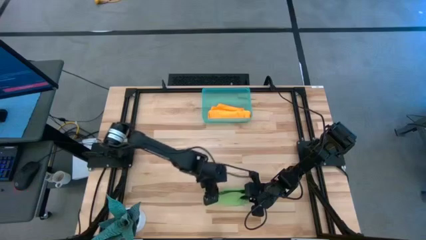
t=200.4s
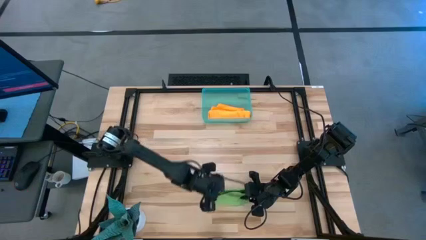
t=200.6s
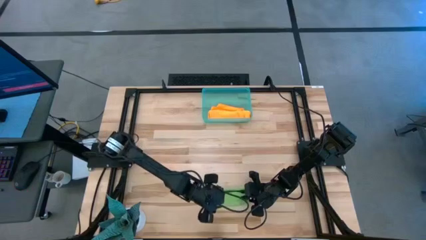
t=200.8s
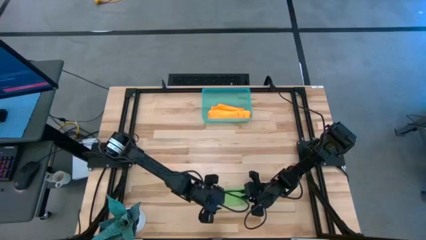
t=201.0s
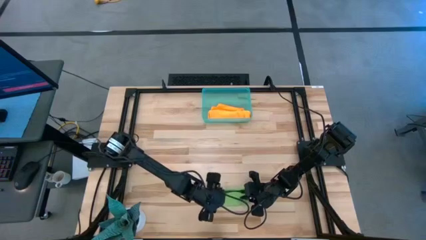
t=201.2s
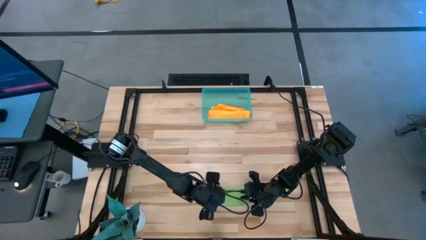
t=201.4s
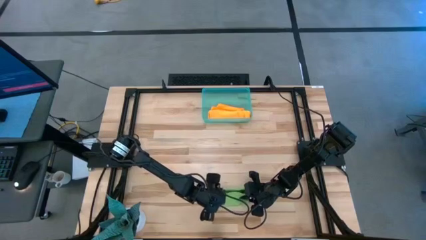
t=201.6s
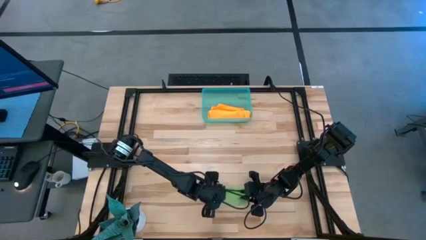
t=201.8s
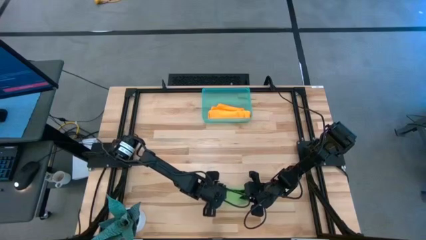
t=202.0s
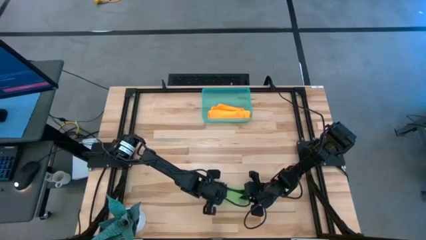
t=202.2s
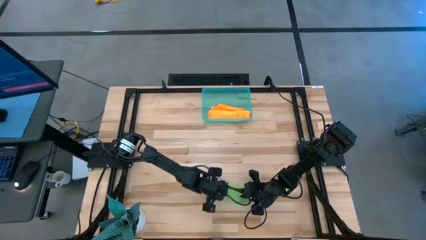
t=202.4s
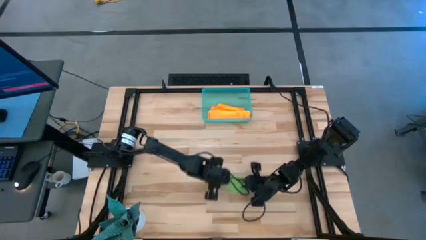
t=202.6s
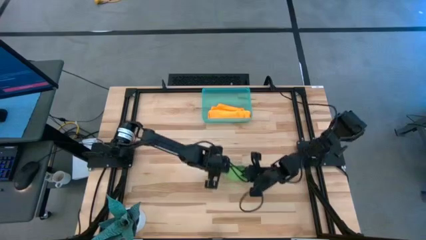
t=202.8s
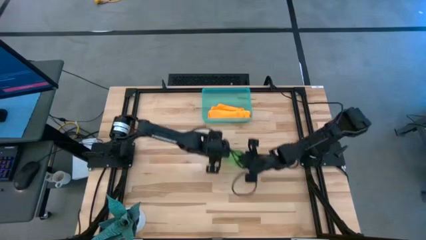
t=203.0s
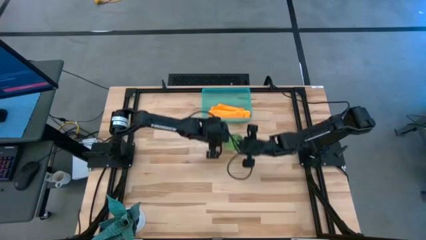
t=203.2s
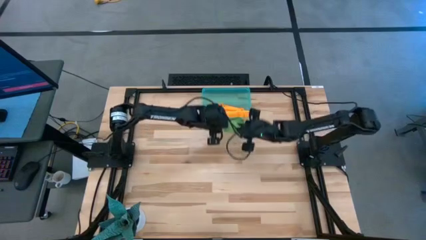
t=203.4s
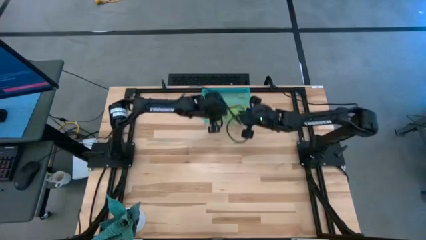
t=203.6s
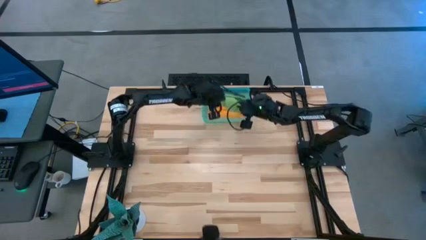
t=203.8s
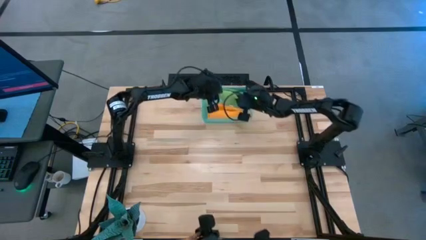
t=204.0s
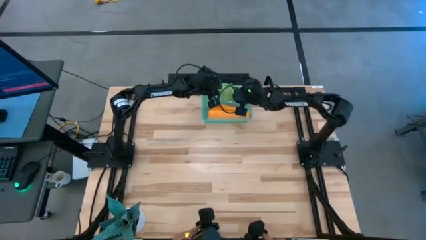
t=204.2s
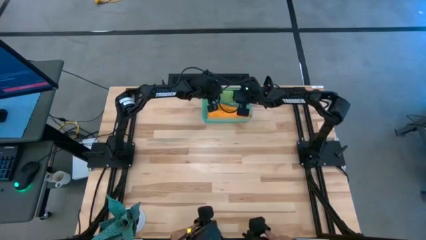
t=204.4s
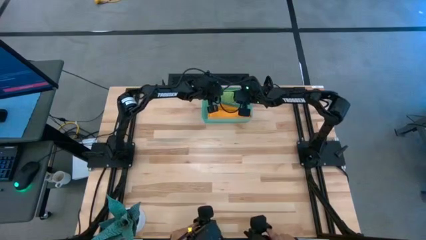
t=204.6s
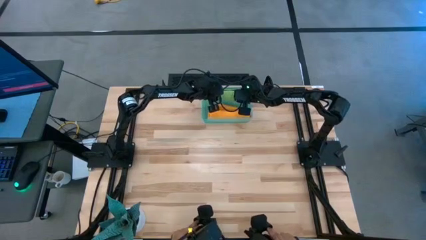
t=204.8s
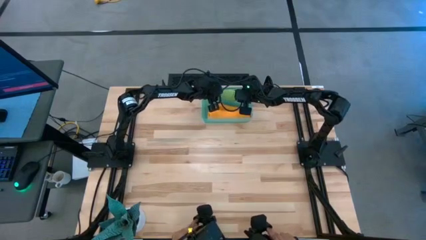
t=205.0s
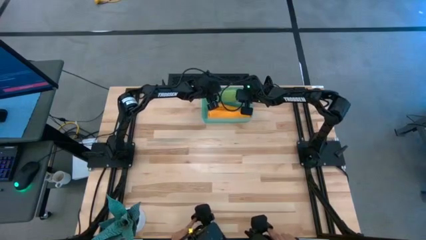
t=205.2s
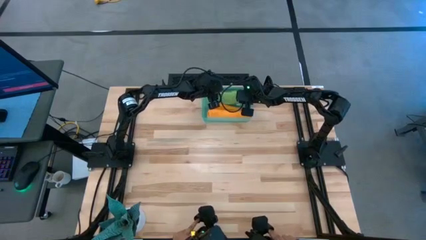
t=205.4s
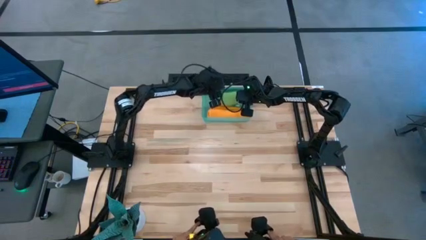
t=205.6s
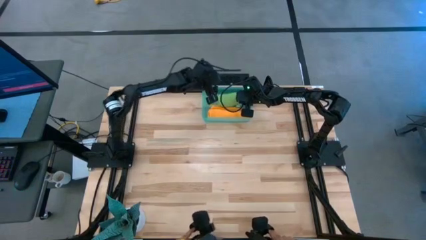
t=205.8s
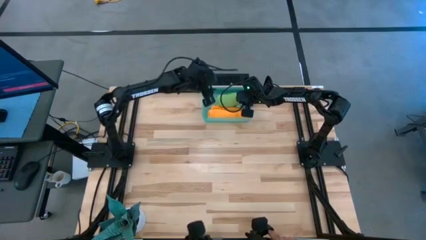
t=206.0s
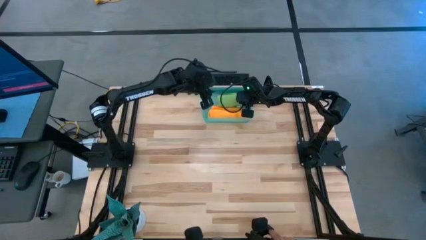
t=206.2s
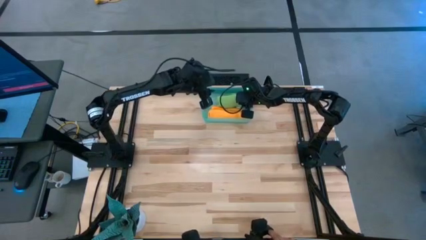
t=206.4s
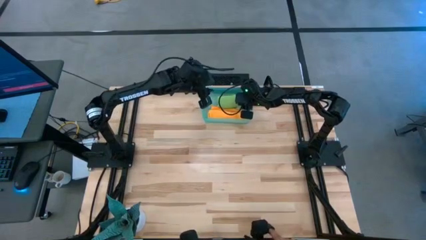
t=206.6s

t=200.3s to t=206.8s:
Task: Roll microfiber towels into tight, uniform cylinder then place into a basket
Put the rolled green microfiber towel into the blue bin

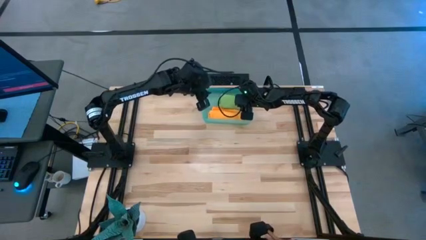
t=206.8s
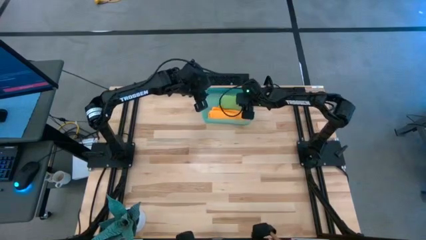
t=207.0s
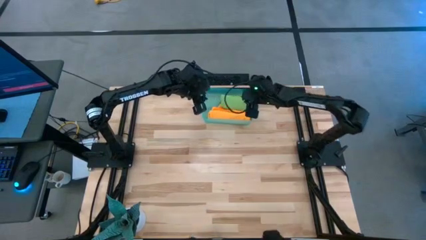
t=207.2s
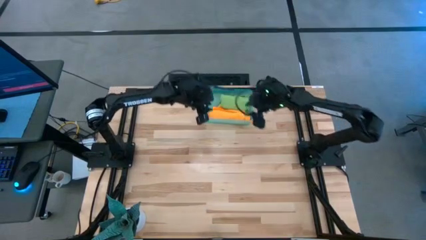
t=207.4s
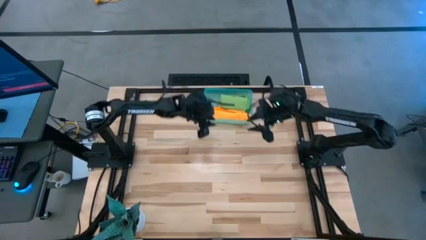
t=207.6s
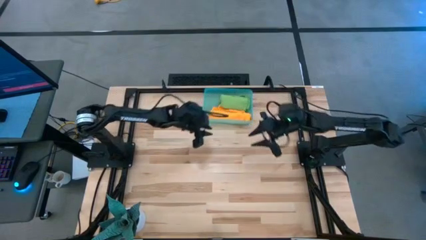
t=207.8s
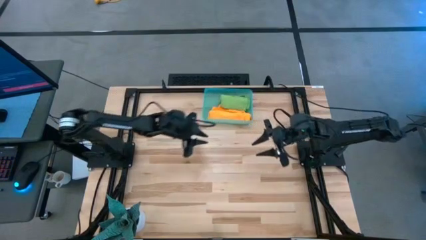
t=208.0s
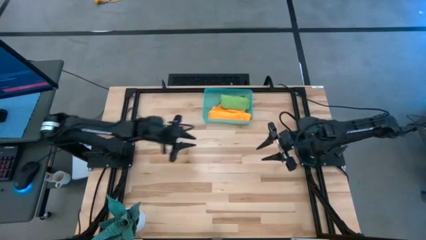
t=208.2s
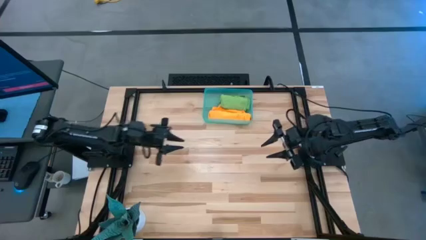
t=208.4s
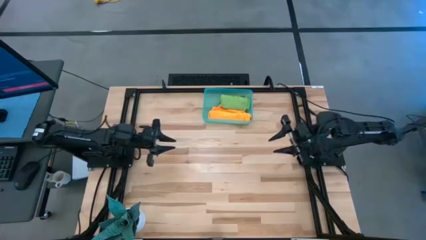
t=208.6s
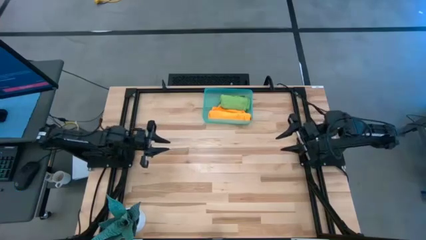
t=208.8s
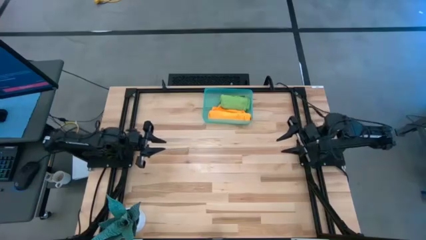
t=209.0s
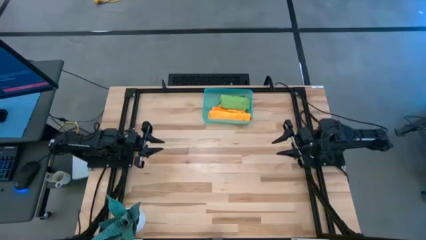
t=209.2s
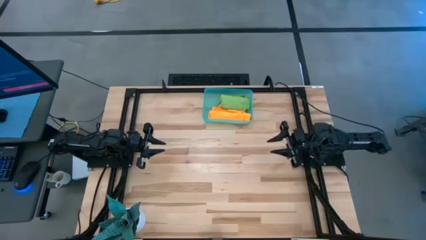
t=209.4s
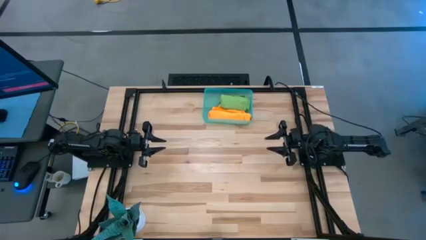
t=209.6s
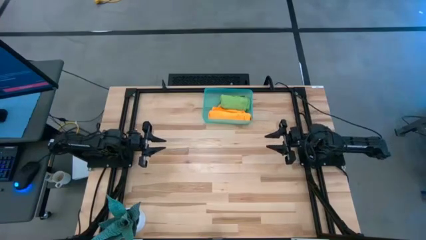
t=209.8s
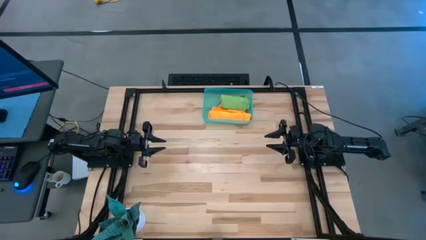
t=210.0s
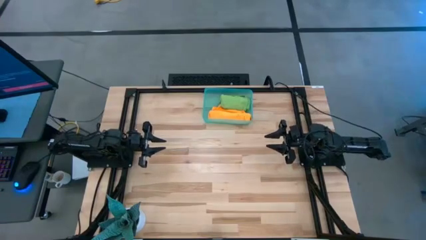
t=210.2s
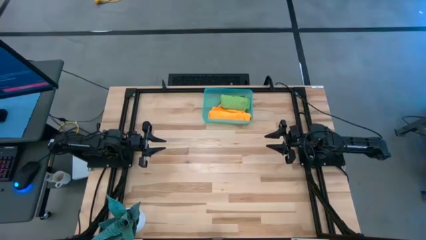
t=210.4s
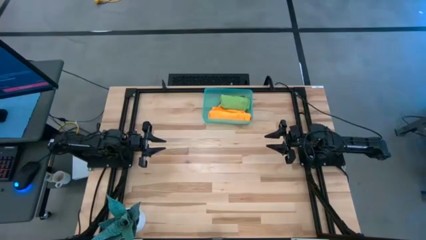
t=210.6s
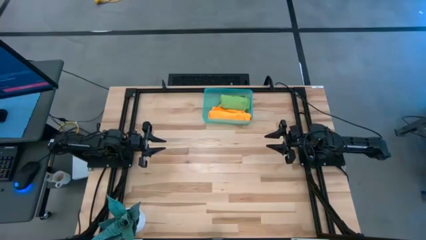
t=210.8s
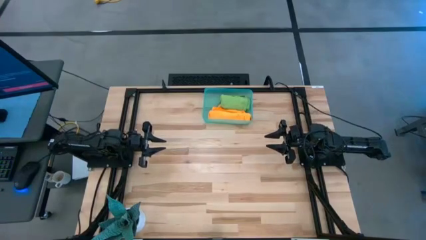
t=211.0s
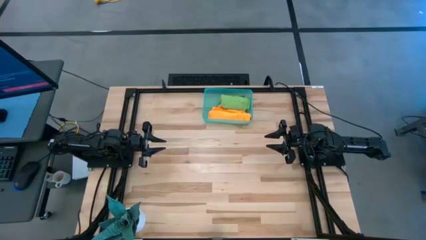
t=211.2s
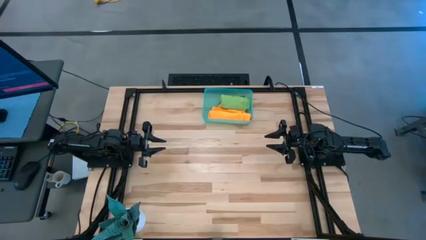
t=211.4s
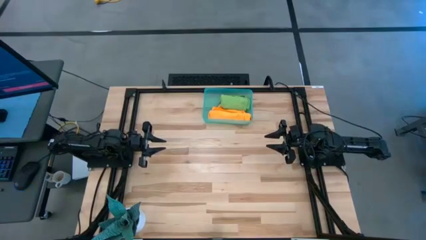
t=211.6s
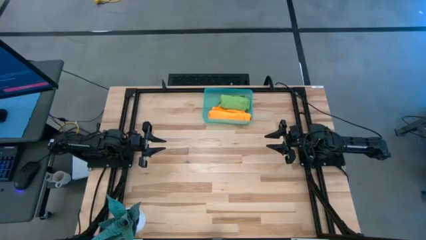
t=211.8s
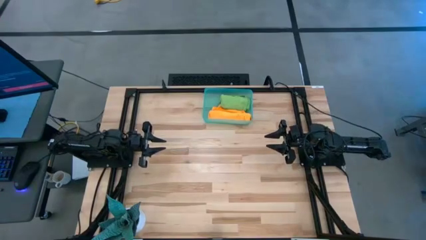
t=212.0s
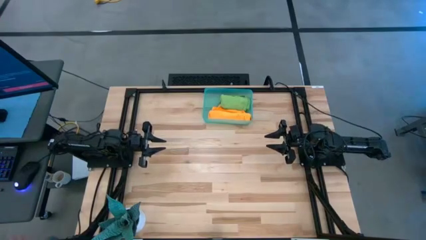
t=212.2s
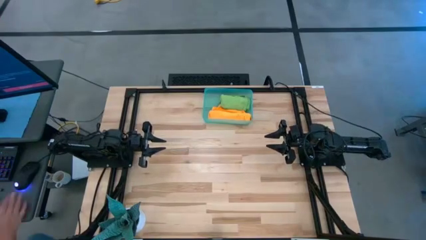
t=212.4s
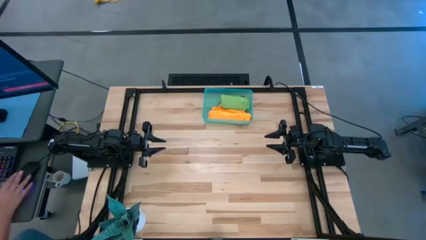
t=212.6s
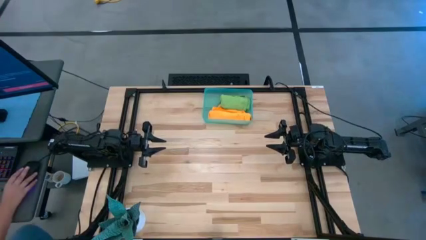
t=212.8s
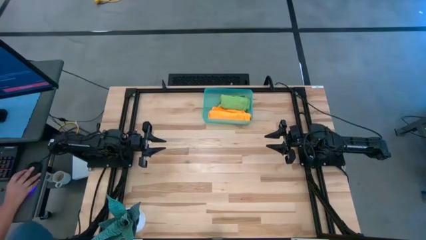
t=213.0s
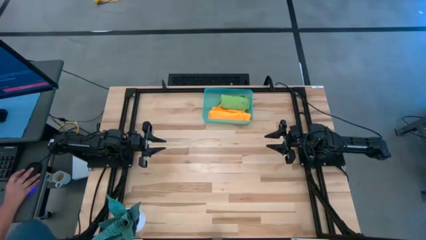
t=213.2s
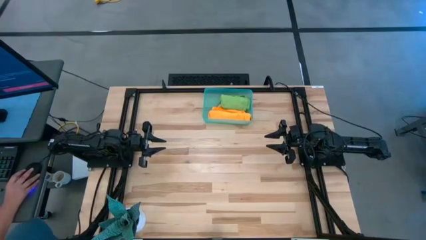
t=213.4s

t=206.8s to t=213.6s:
Return to Home Position
